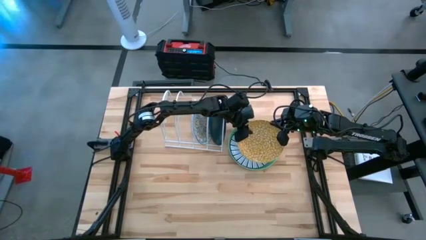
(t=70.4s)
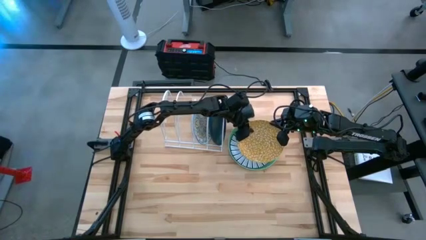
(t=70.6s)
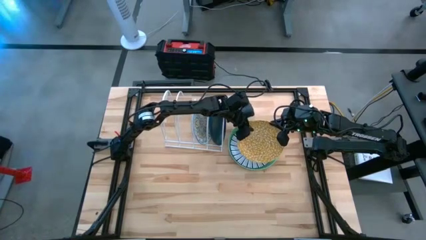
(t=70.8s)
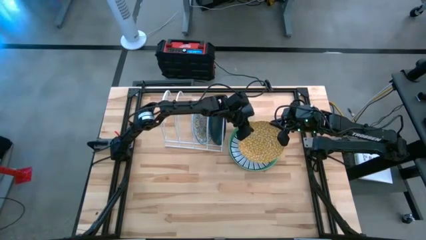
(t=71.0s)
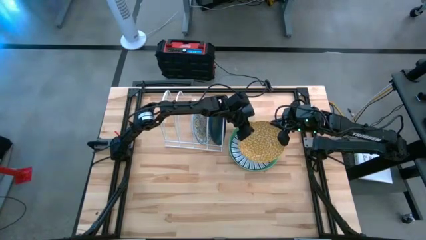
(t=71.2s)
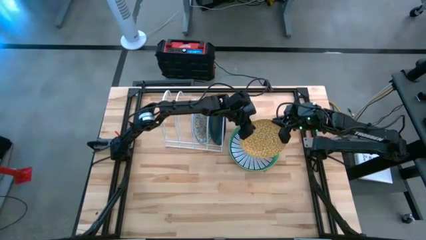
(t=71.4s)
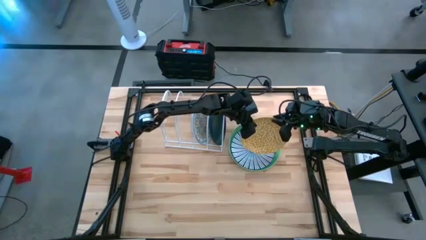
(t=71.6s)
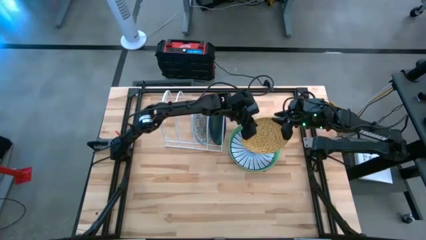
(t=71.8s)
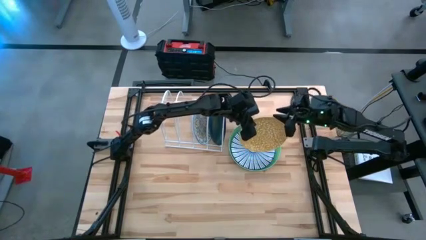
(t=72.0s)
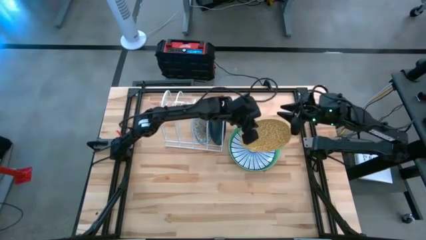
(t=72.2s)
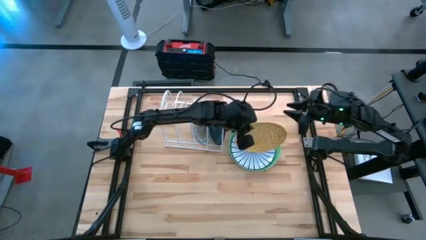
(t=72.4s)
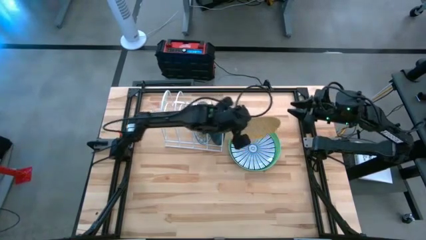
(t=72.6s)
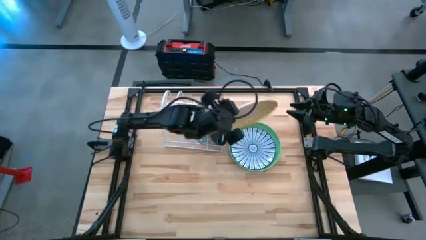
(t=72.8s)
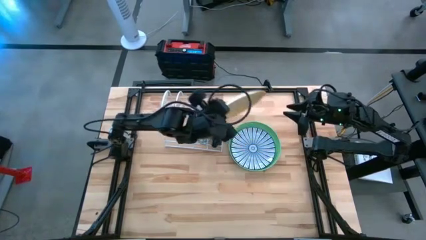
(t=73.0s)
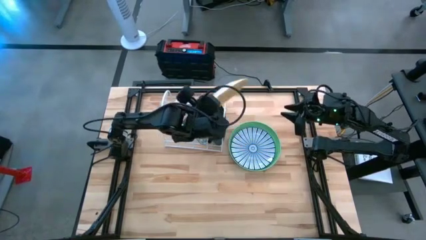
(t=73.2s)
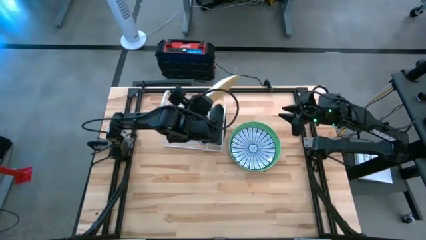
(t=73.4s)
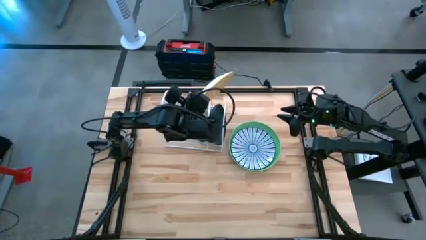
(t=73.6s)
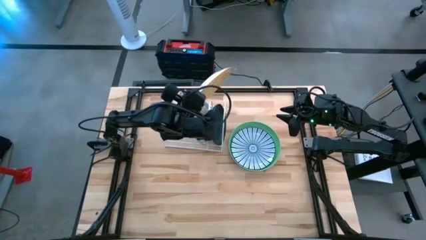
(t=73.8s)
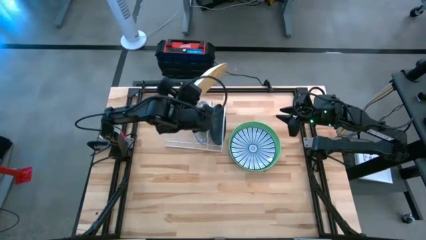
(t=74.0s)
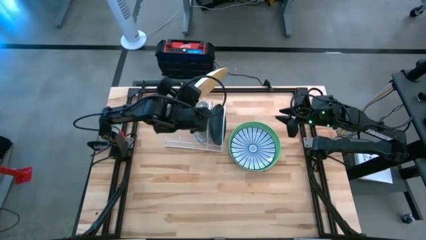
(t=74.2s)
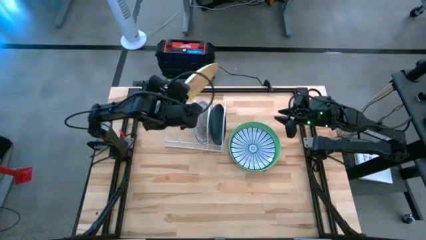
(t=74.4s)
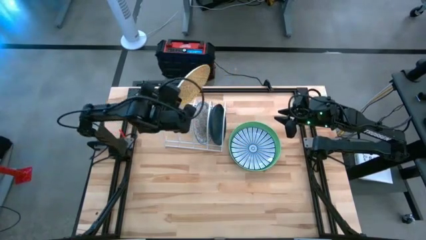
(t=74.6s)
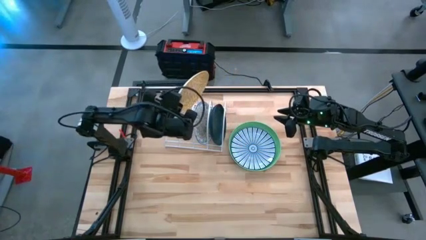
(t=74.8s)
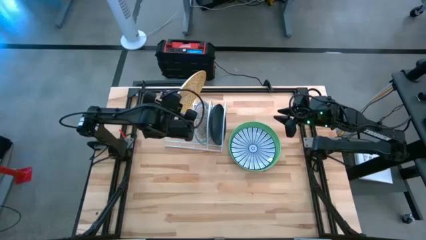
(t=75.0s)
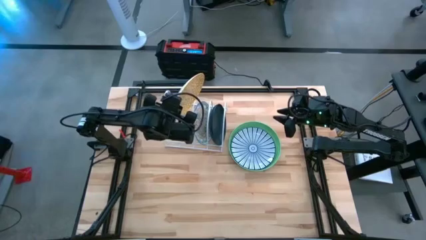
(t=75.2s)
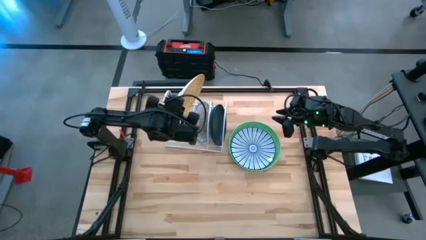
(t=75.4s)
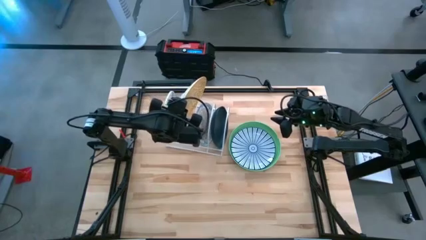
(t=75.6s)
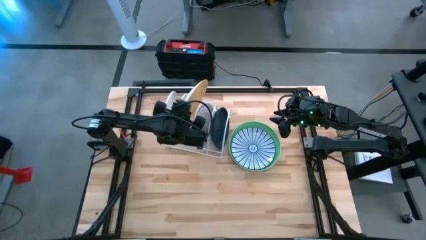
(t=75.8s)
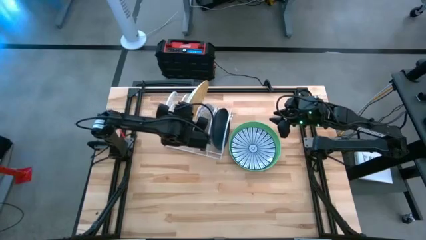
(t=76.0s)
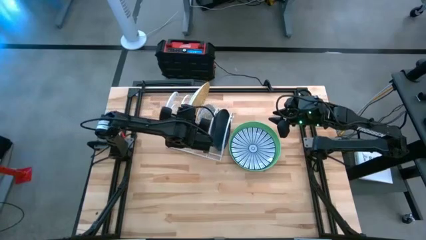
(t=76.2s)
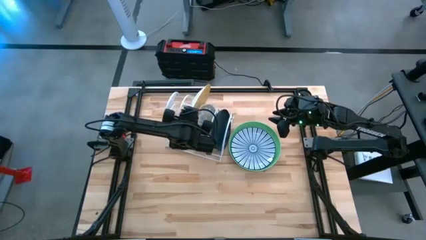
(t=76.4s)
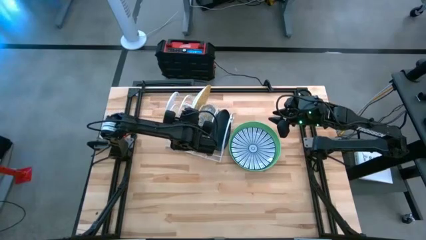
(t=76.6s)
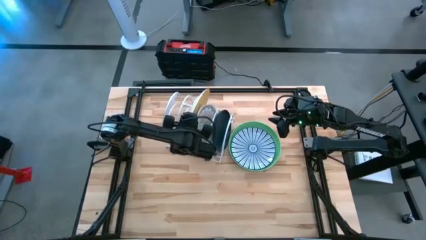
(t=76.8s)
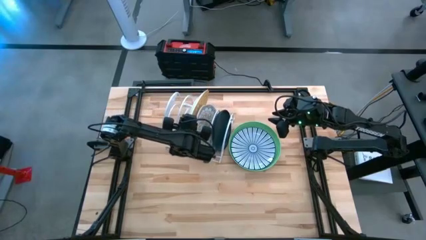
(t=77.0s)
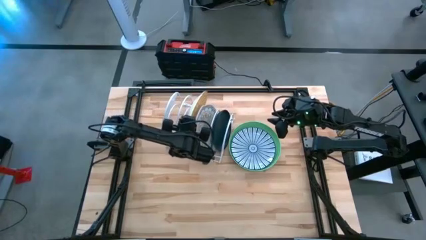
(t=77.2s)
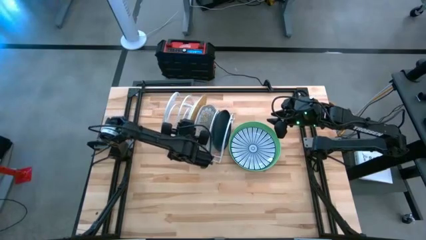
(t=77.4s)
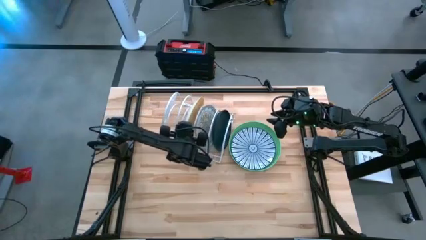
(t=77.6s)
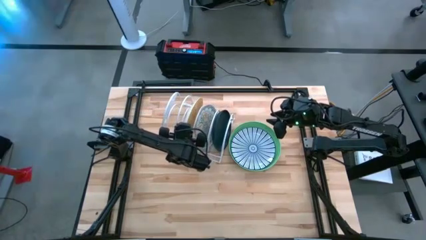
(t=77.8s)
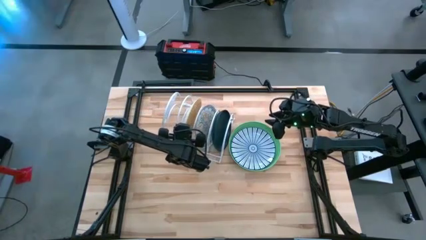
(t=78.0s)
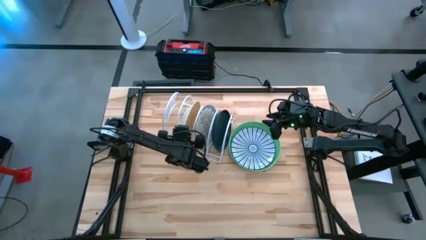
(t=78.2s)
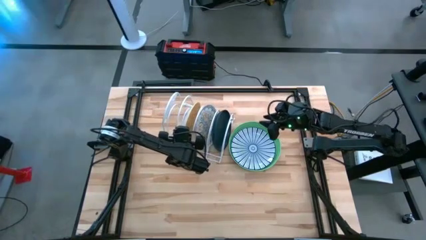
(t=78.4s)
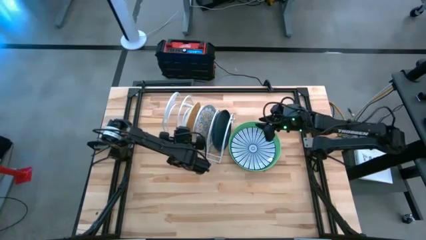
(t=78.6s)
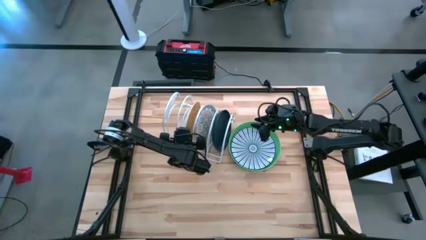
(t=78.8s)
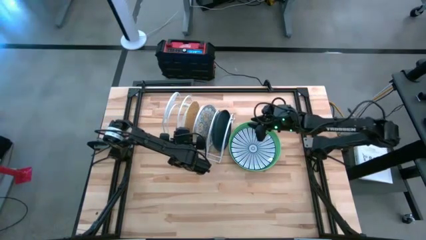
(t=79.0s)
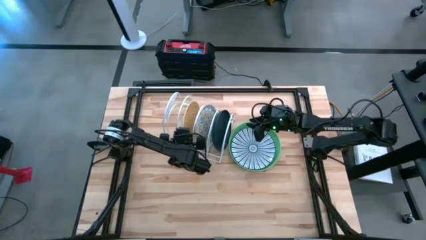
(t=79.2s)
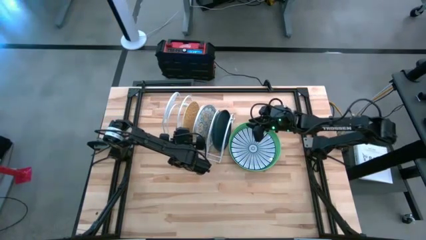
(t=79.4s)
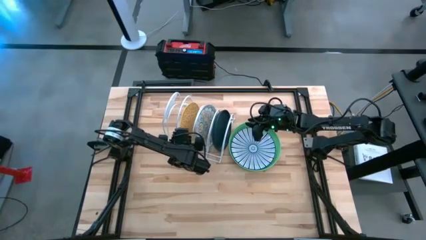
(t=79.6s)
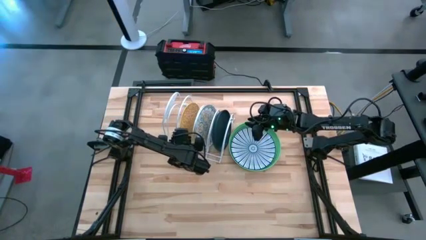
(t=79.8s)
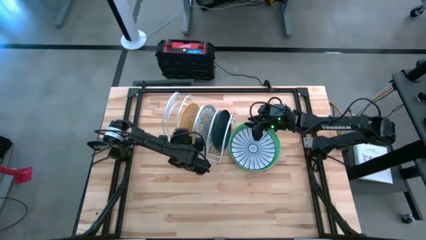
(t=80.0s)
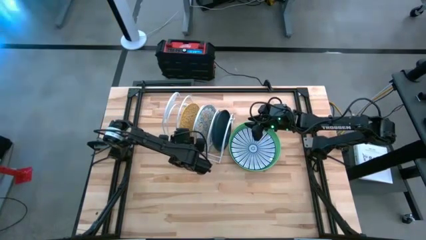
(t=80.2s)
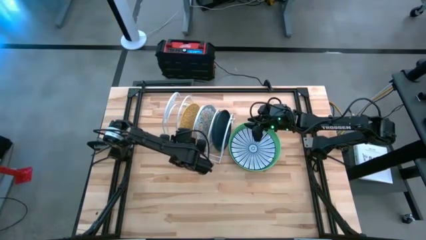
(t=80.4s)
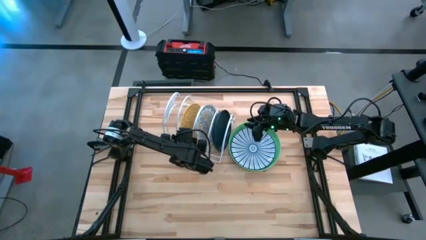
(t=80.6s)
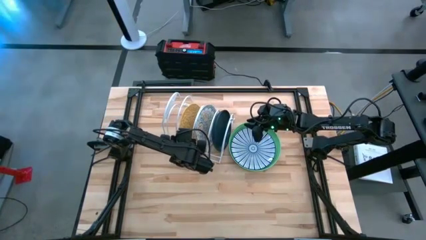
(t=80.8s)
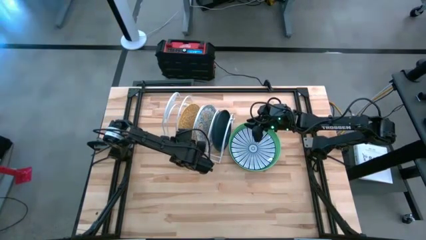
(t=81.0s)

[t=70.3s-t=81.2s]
Task: Sort dishes
Put the yellow plate in the dish rack

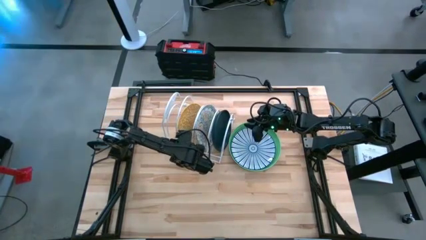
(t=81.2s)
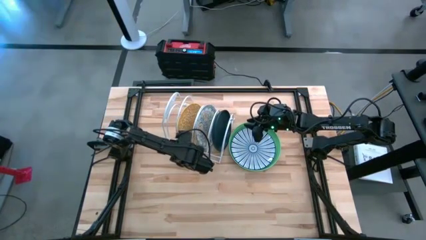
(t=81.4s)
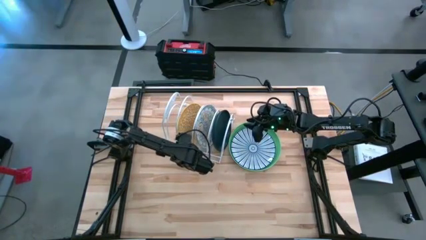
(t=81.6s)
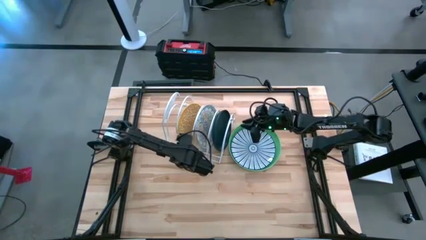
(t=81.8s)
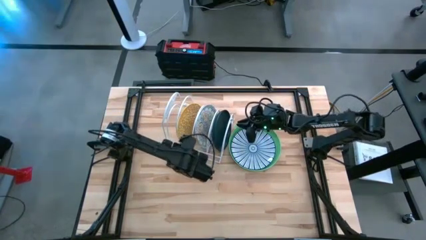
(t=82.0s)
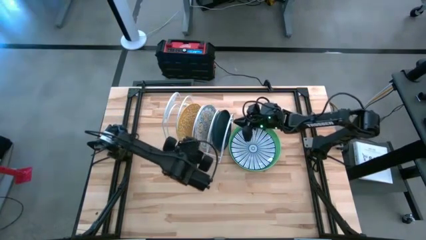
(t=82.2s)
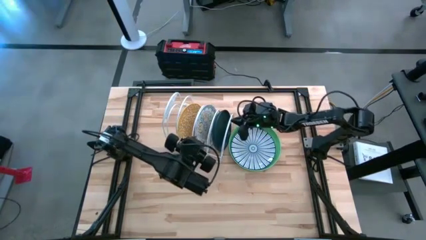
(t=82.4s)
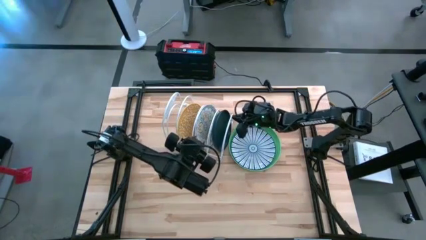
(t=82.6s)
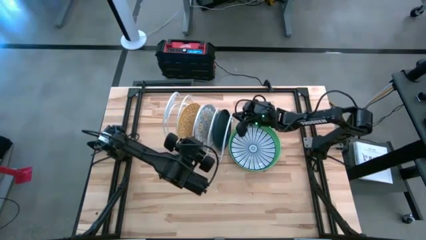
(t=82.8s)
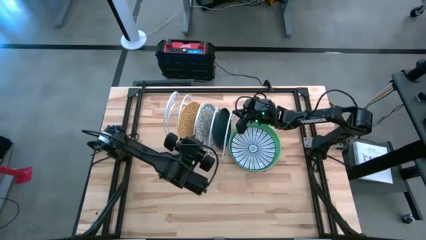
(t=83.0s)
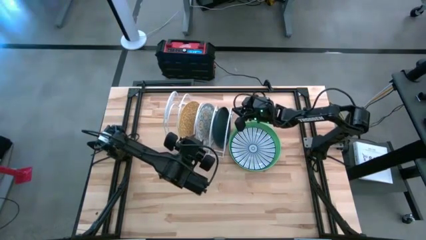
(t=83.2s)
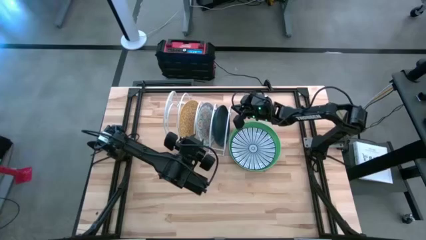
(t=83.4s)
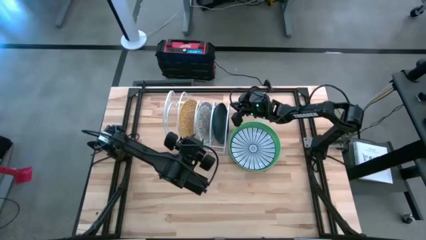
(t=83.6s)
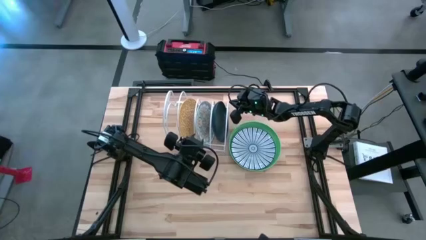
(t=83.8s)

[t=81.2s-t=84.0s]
Adjust the dish rack
